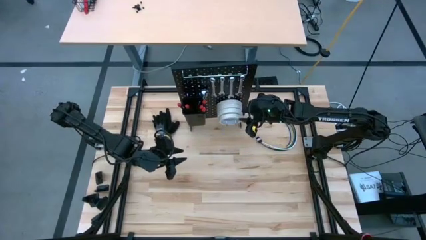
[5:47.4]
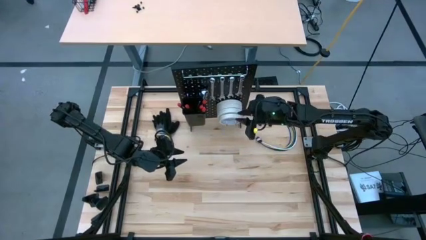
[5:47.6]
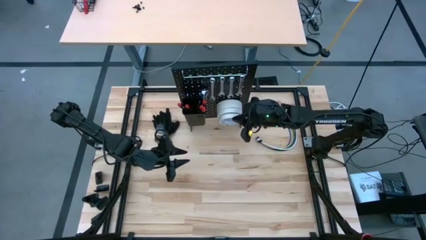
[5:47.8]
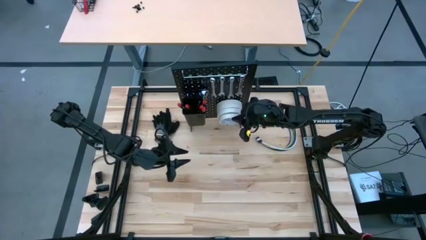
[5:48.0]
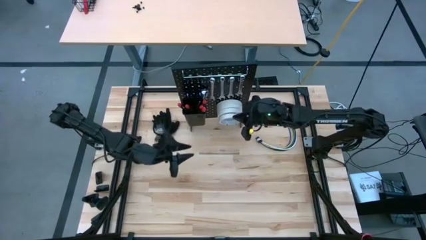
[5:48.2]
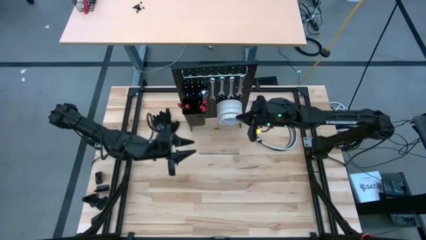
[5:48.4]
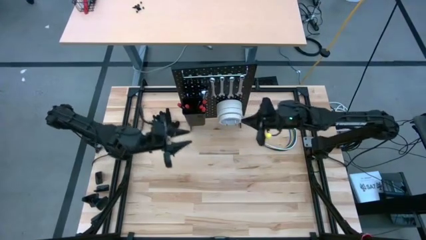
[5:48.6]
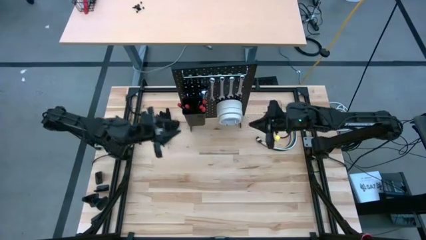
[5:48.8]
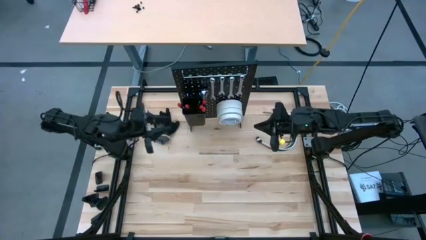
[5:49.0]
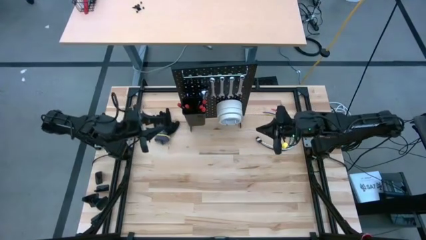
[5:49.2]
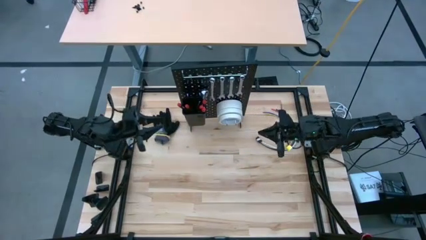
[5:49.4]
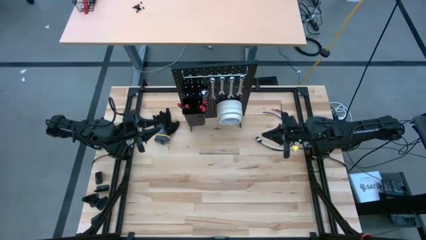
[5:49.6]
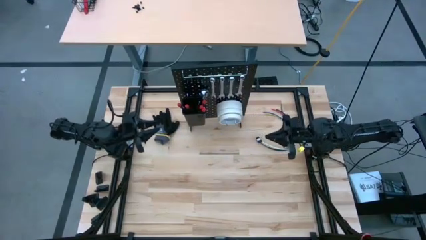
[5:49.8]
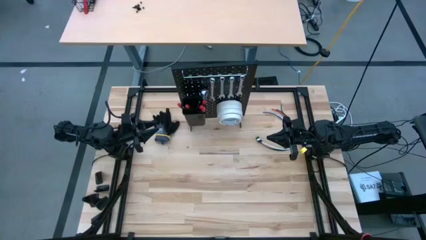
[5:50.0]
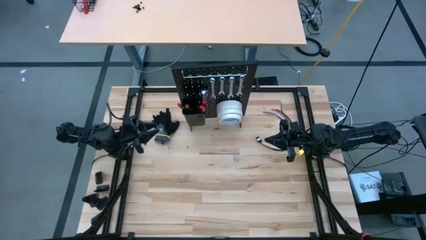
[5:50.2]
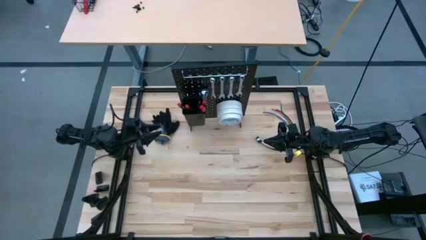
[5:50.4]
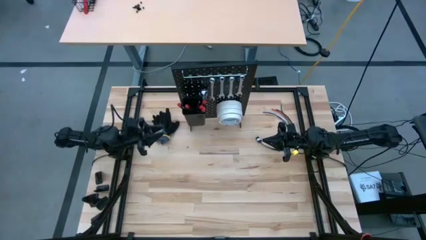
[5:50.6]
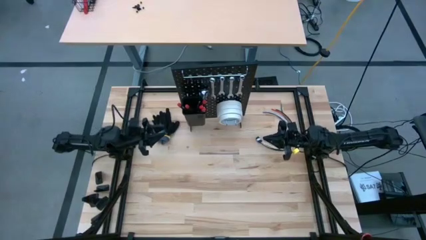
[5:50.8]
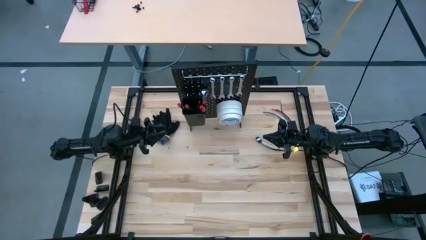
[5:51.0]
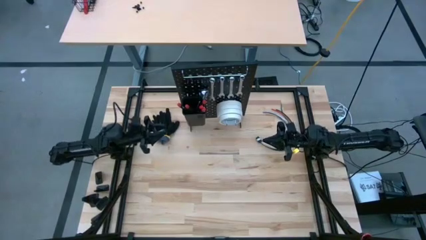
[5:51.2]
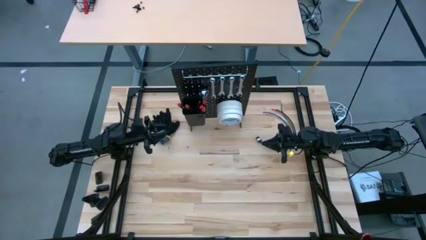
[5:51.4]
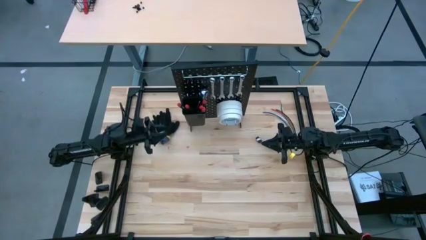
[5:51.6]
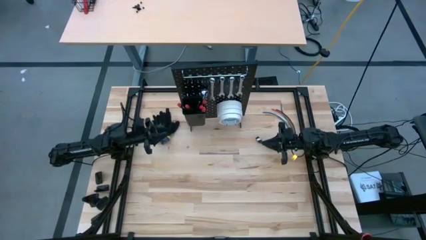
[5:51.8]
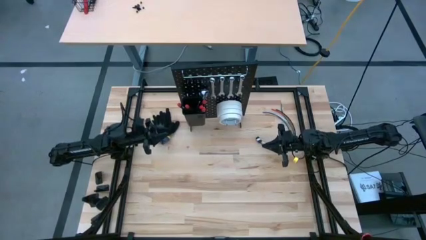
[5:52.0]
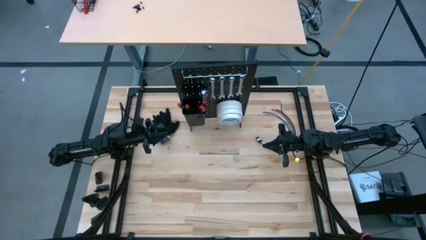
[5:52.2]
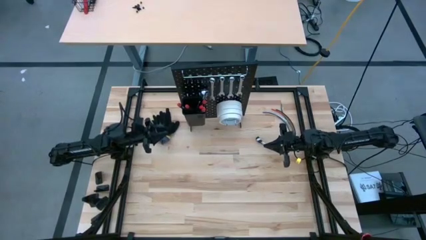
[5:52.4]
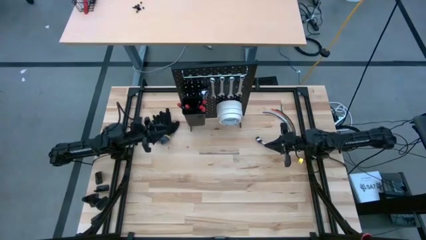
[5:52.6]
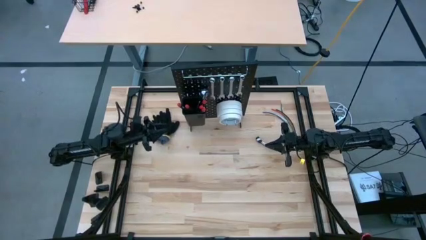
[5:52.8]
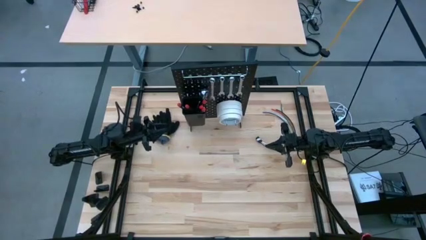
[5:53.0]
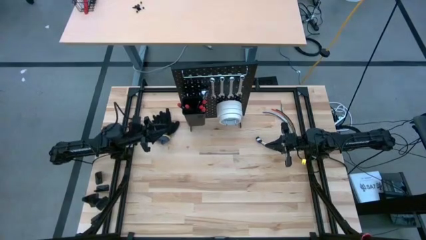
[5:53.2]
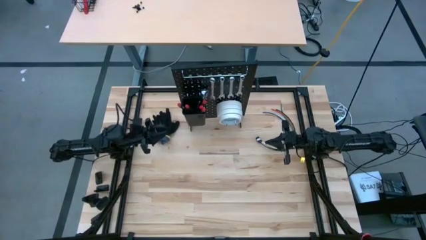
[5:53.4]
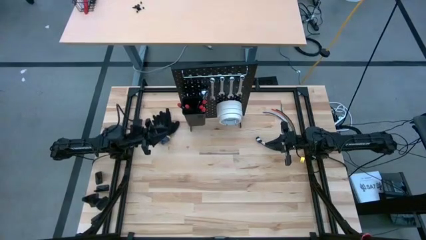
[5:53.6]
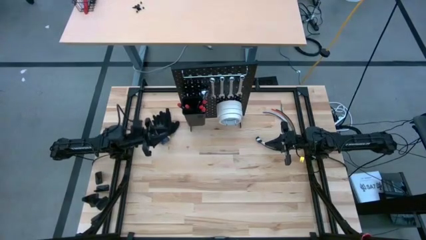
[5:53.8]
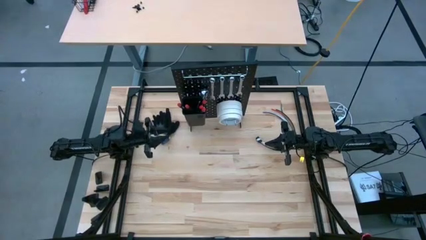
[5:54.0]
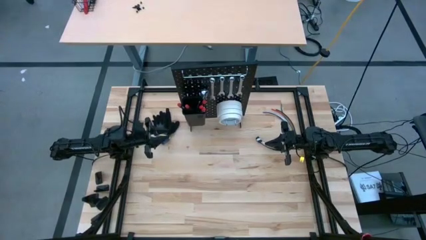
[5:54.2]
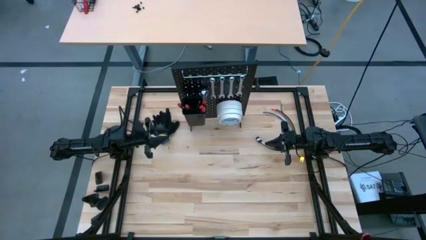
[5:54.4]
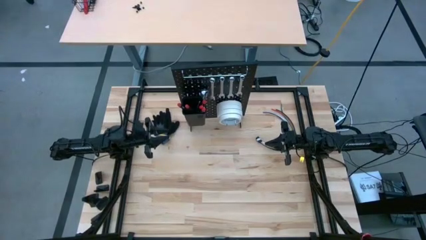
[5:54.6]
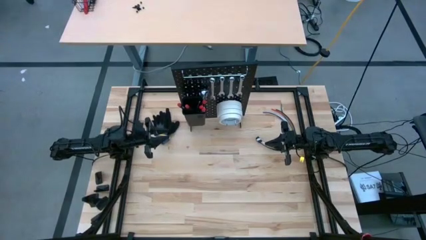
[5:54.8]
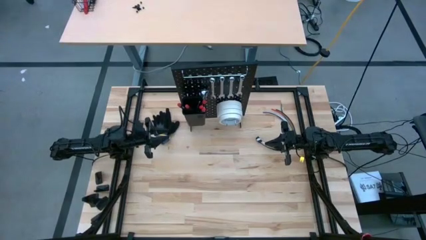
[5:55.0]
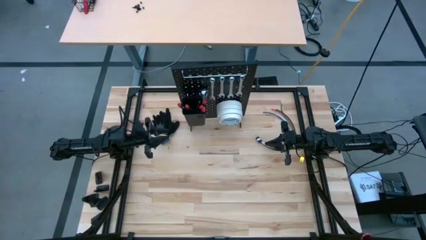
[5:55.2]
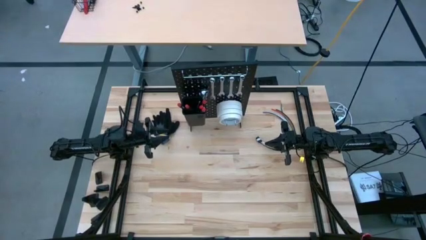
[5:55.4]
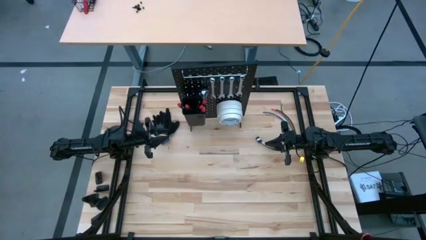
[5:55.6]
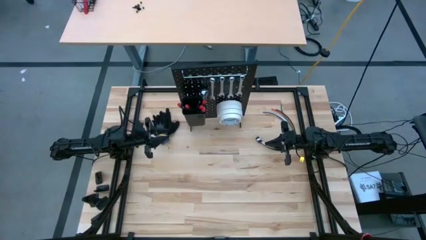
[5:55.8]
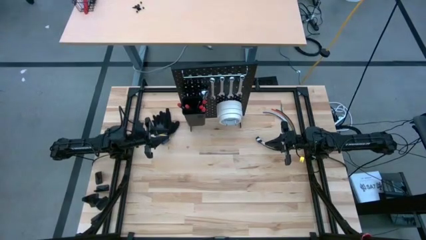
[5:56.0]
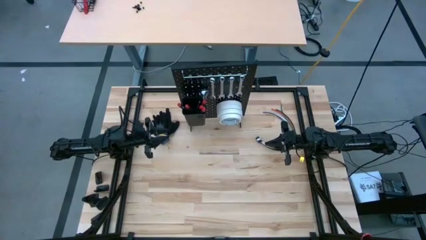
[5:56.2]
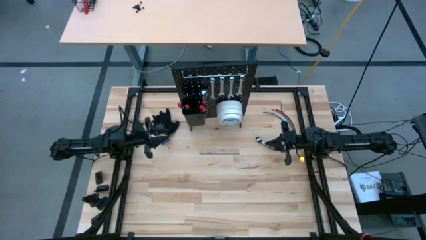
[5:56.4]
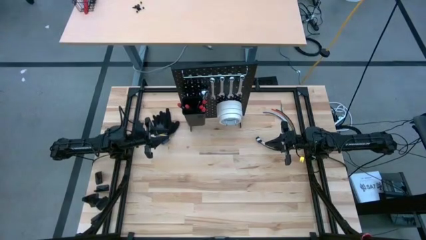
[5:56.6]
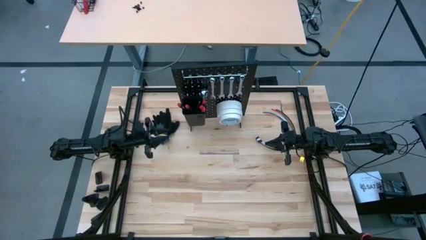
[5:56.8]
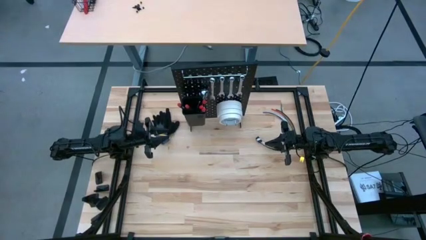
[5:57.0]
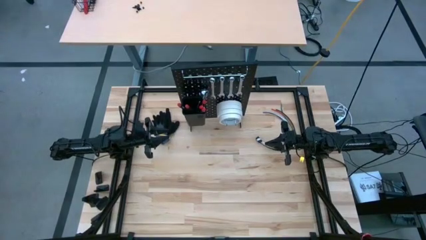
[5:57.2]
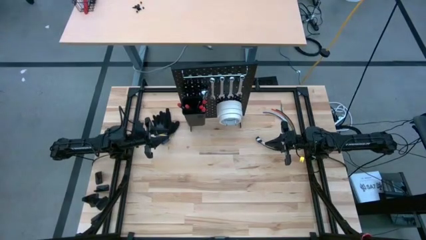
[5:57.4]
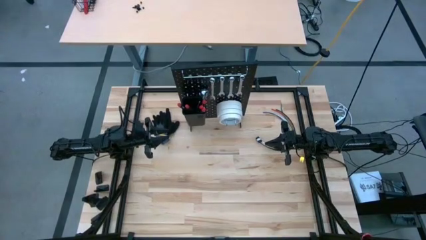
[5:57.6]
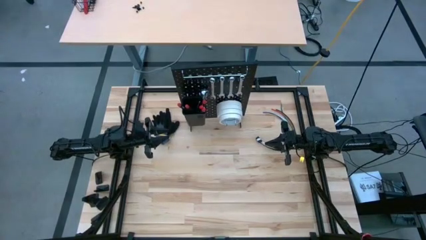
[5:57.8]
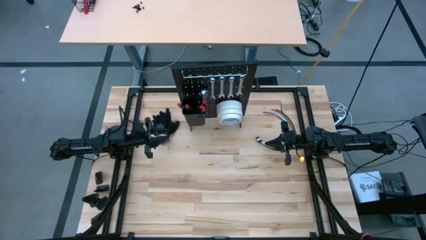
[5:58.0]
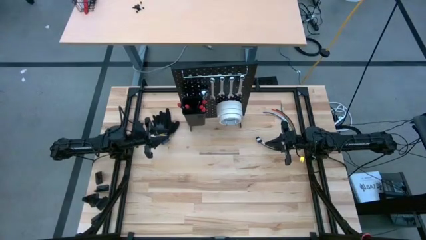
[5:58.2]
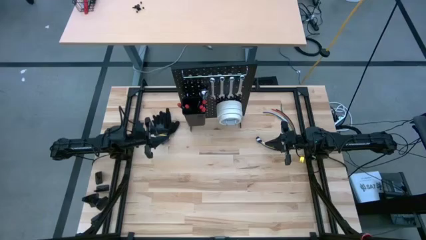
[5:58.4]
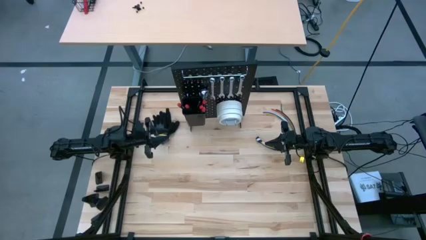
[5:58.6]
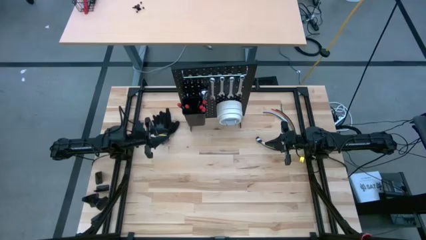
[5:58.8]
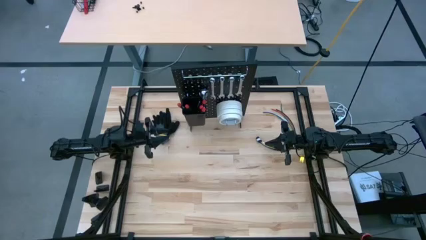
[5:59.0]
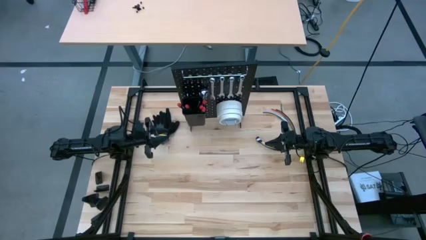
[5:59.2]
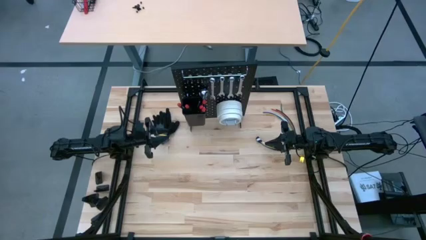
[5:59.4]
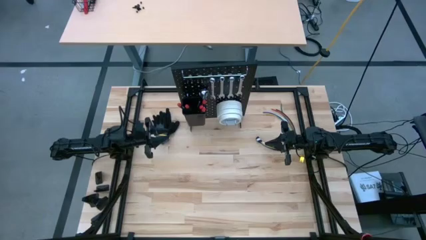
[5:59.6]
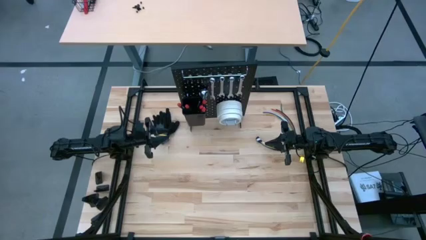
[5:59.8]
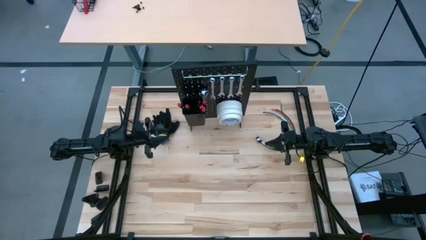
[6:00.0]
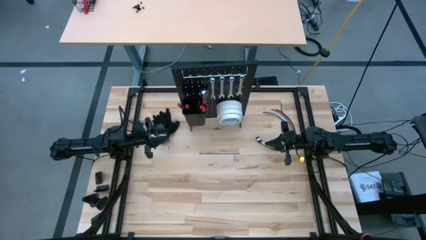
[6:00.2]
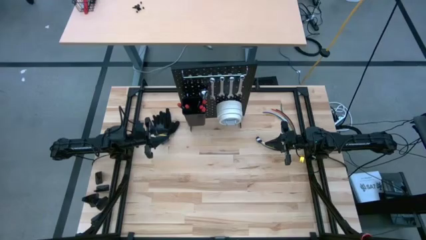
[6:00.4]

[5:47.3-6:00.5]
Task: Hang tools onto peg board
Return to Home Position

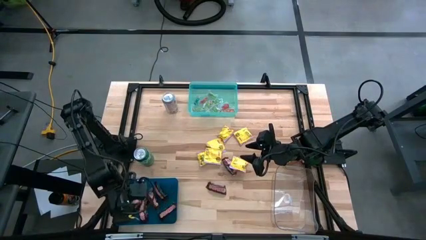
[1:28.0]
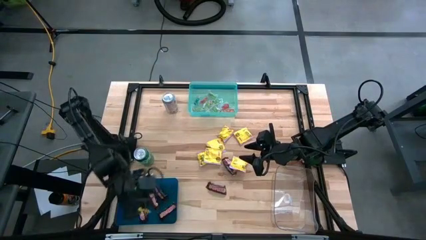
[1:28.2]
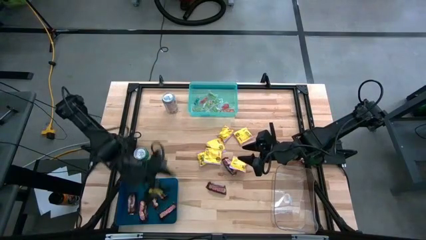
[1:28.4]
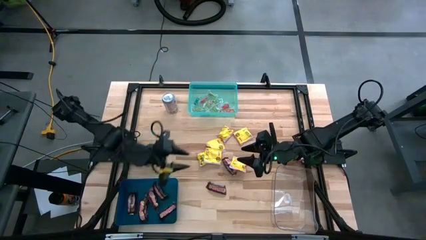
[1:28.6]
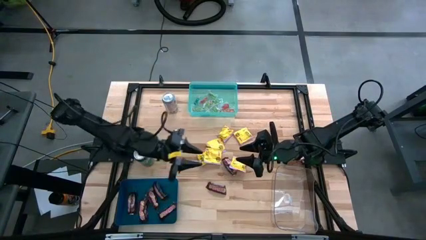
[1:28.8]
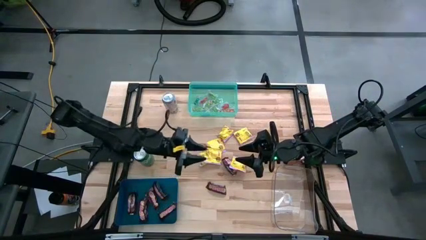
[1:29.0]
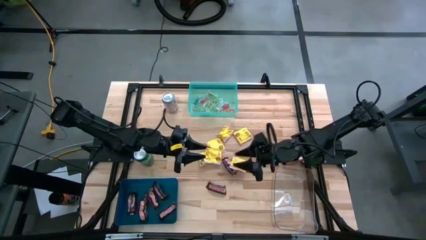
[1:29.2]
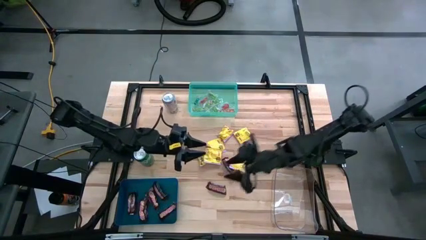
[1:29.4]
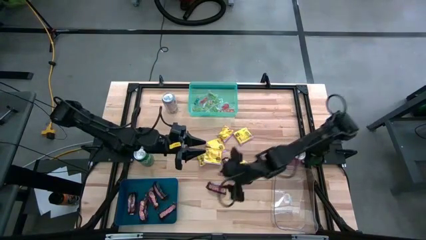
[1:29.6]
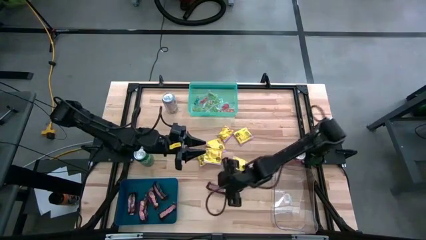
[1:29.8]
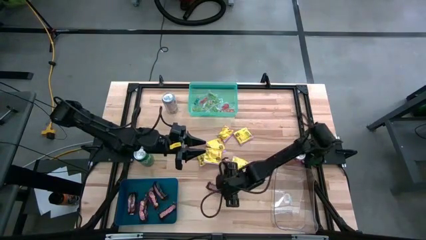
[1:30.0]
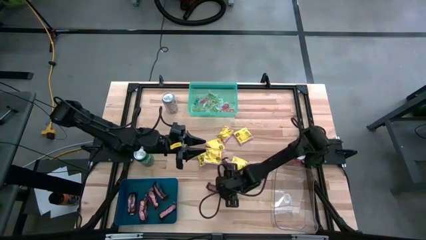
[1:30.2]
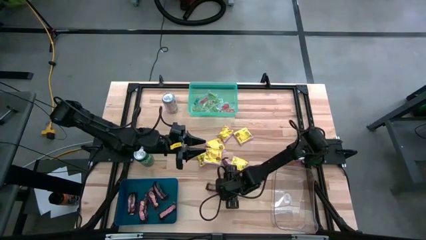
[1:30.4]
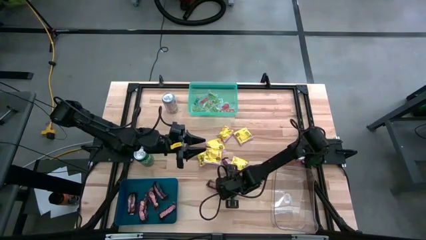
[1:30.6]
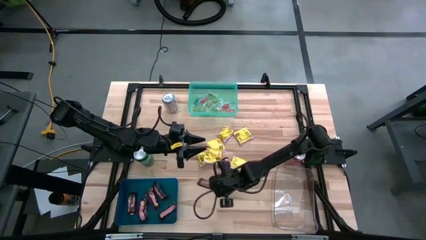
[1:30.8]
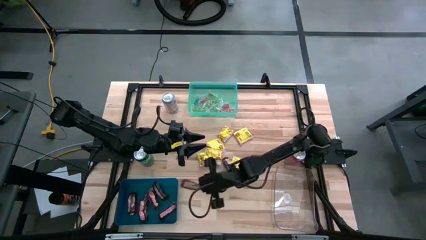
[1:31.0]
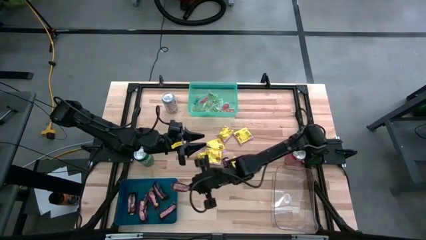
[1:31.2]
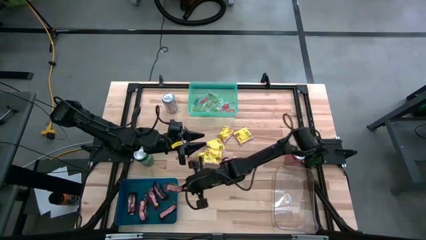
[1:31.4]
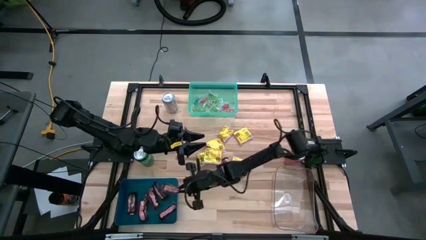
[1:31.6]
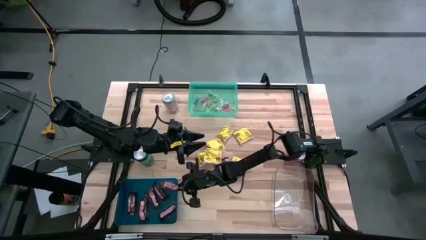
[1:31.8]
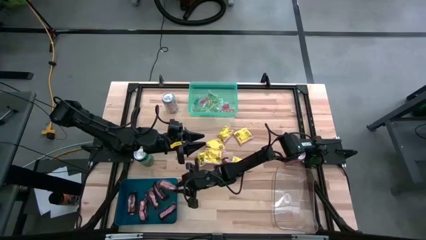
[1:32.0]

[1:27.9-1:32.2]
Task: Sort candy
Put the brown chocolate into the dark blue bin
